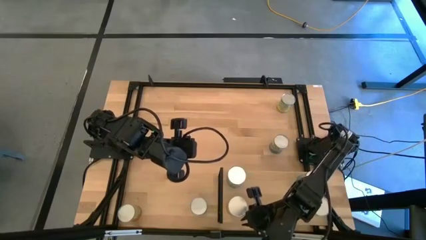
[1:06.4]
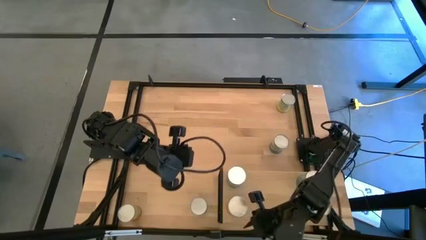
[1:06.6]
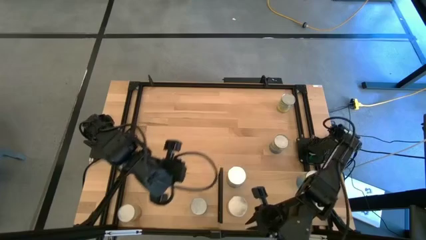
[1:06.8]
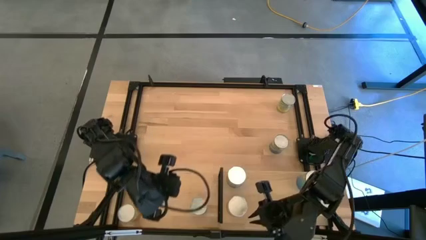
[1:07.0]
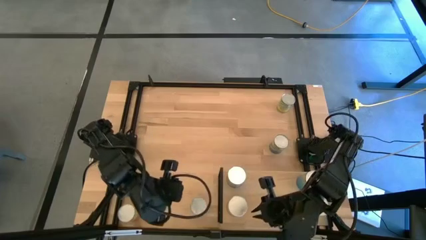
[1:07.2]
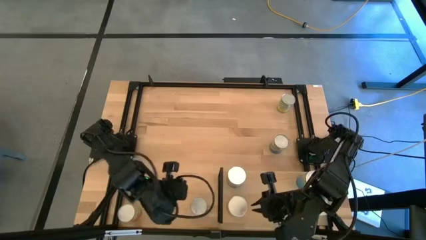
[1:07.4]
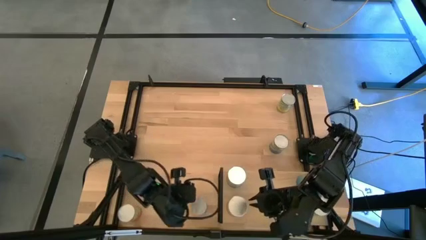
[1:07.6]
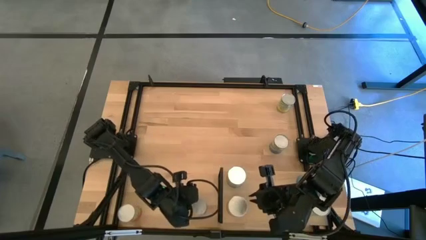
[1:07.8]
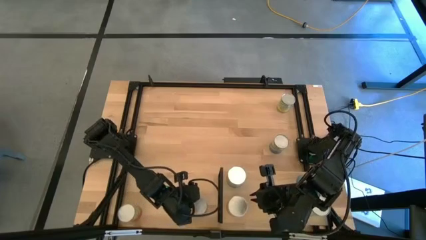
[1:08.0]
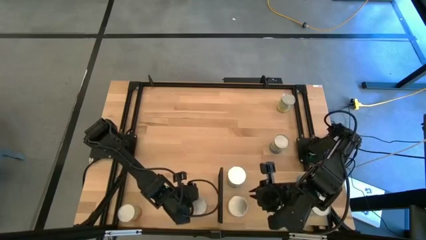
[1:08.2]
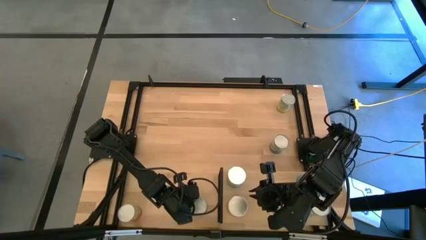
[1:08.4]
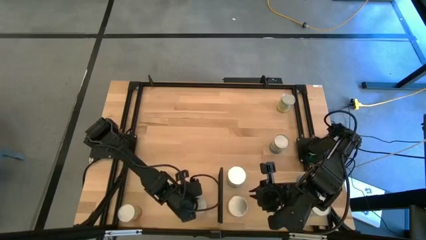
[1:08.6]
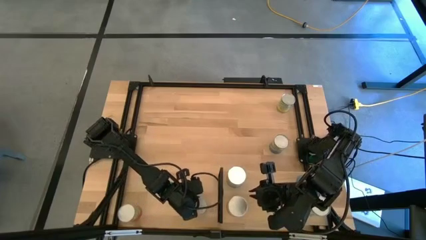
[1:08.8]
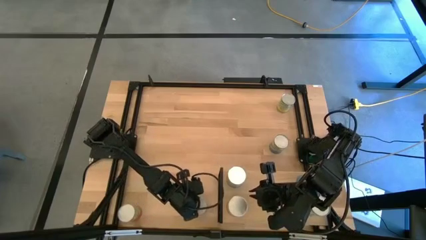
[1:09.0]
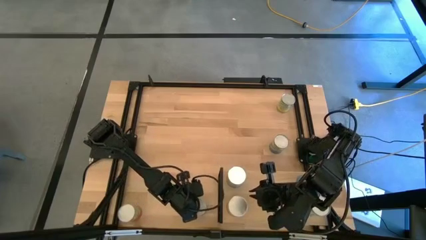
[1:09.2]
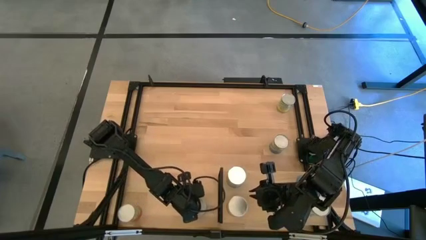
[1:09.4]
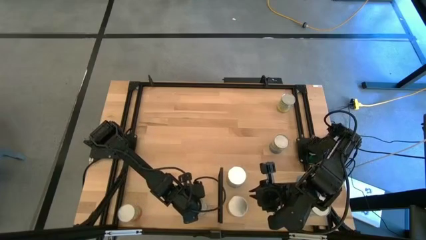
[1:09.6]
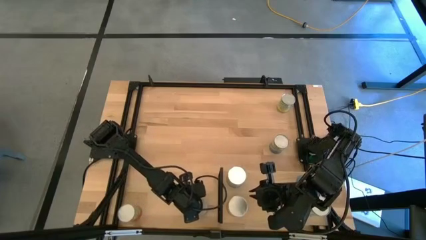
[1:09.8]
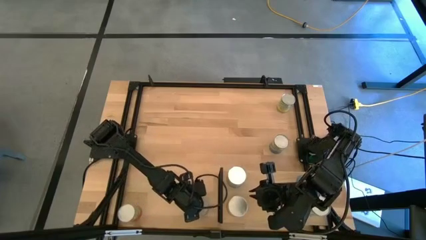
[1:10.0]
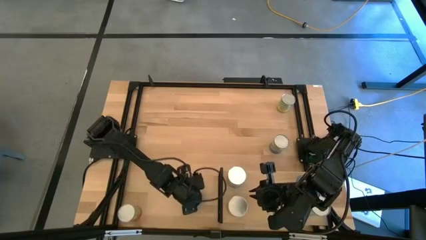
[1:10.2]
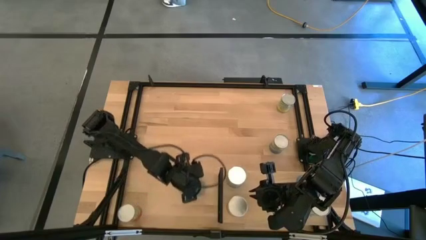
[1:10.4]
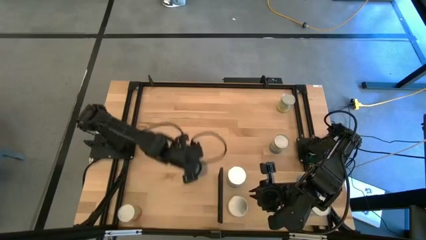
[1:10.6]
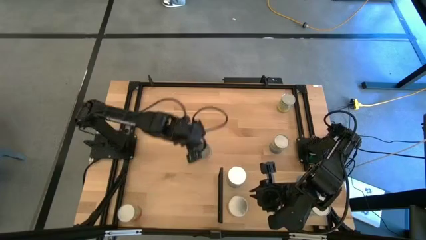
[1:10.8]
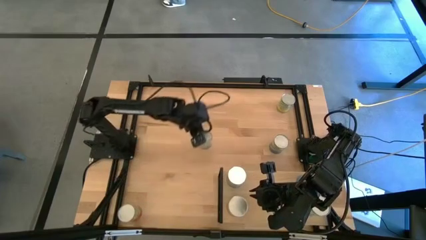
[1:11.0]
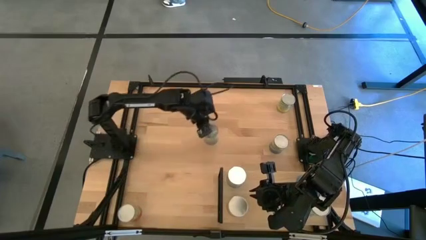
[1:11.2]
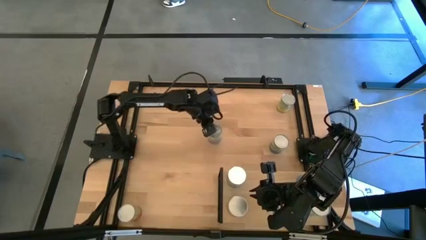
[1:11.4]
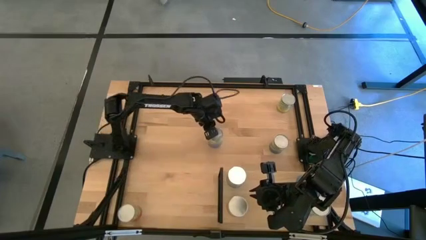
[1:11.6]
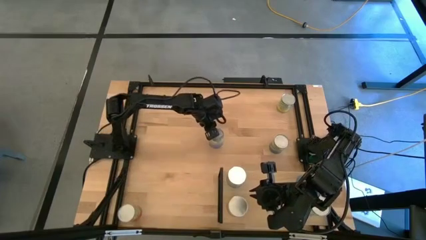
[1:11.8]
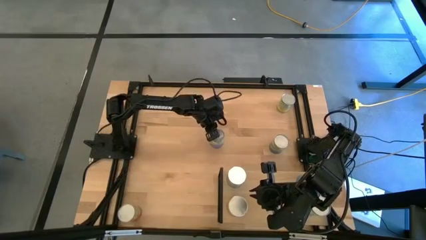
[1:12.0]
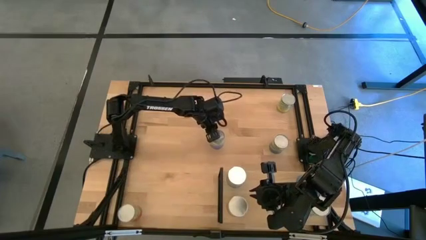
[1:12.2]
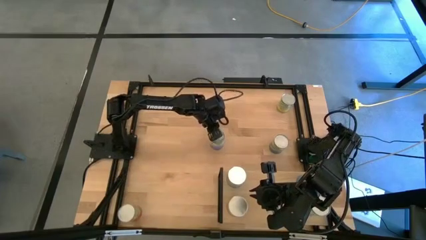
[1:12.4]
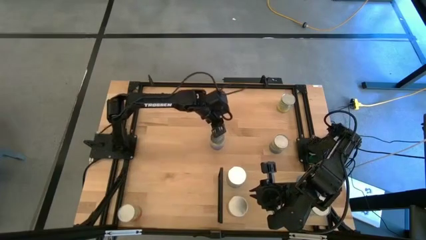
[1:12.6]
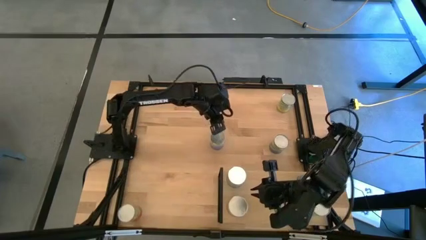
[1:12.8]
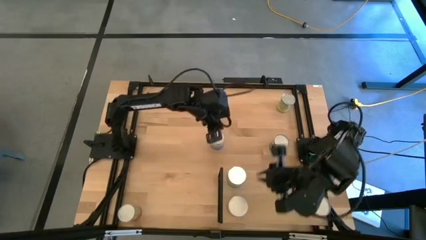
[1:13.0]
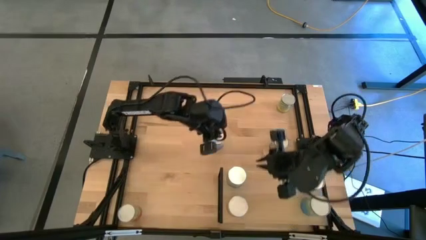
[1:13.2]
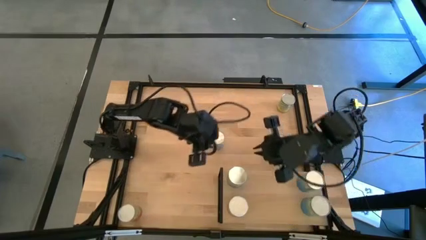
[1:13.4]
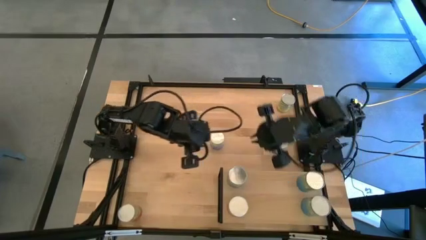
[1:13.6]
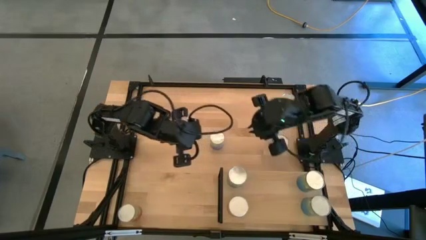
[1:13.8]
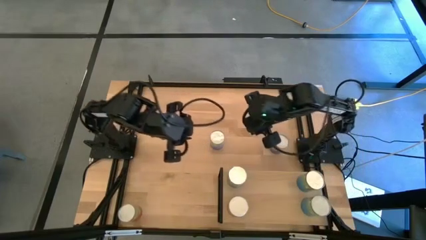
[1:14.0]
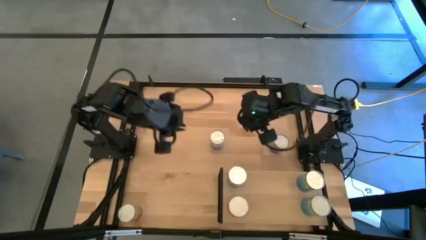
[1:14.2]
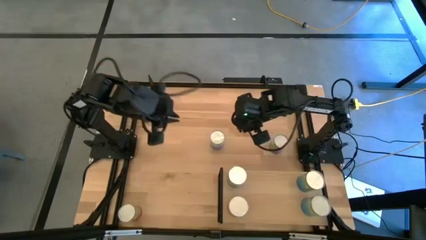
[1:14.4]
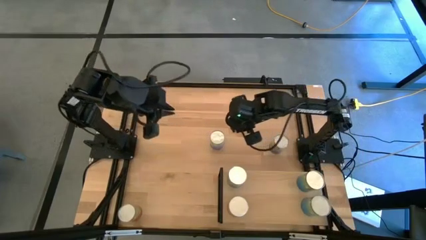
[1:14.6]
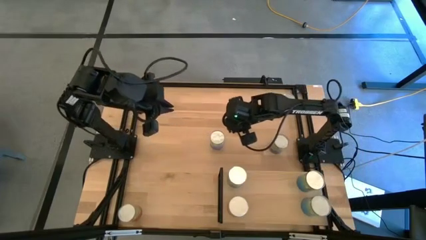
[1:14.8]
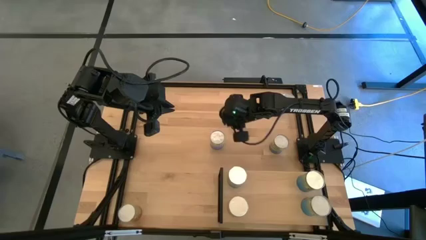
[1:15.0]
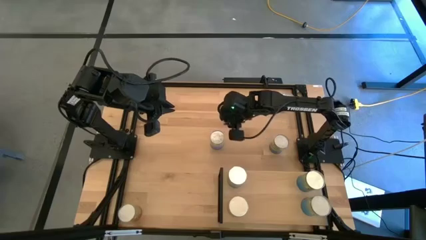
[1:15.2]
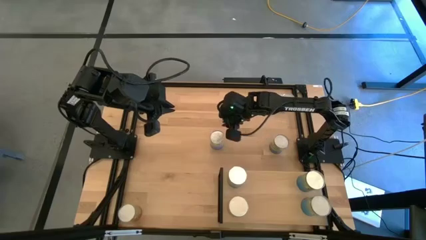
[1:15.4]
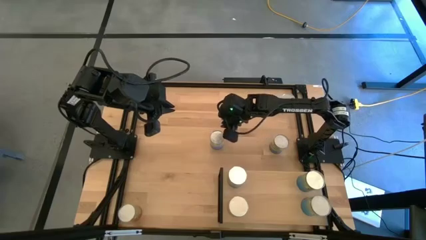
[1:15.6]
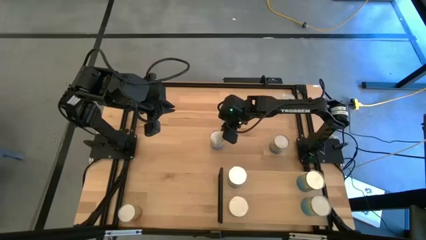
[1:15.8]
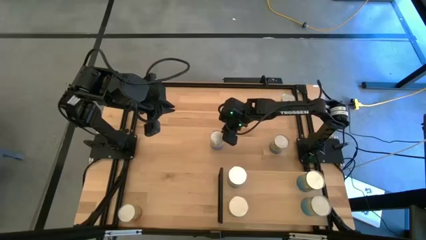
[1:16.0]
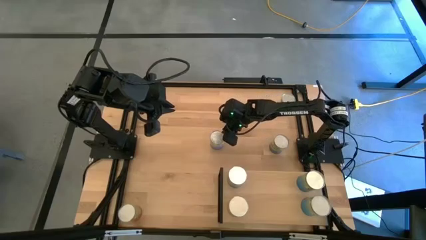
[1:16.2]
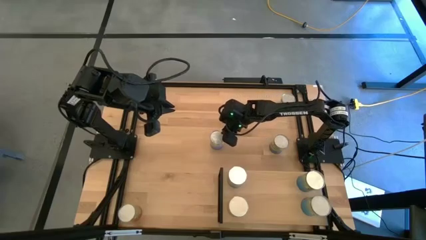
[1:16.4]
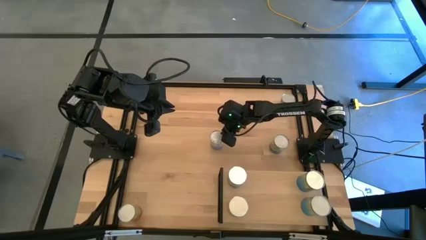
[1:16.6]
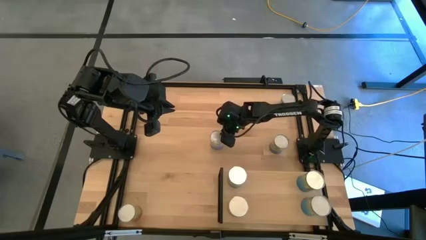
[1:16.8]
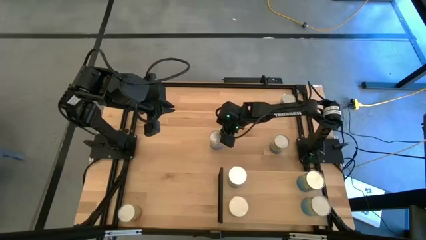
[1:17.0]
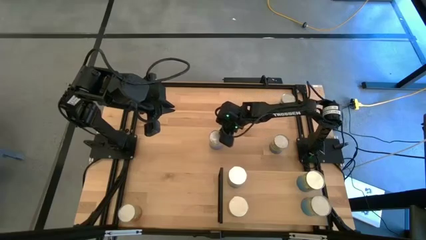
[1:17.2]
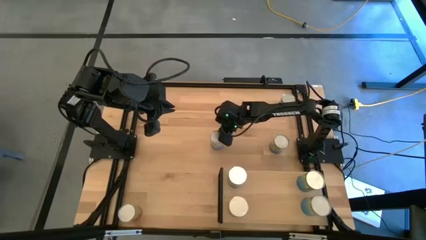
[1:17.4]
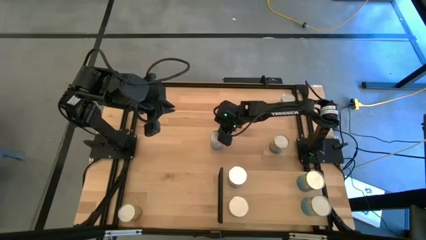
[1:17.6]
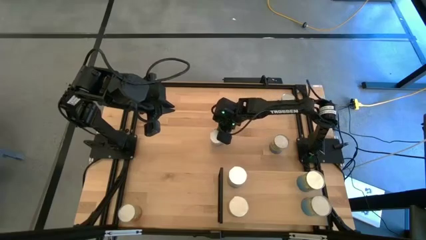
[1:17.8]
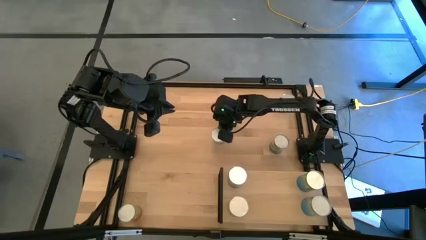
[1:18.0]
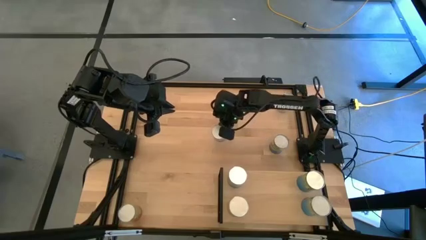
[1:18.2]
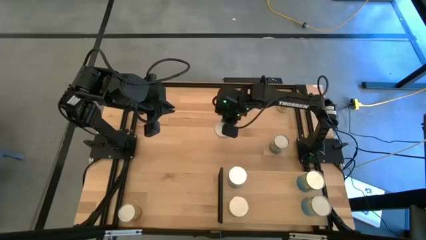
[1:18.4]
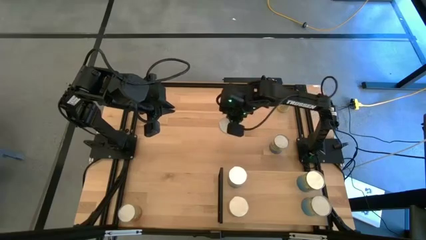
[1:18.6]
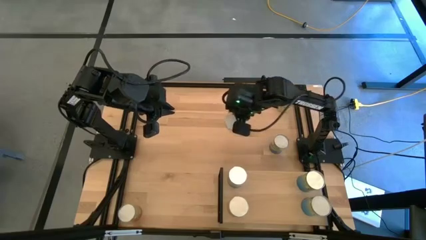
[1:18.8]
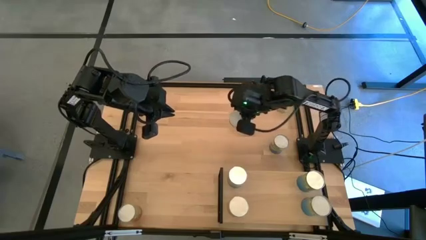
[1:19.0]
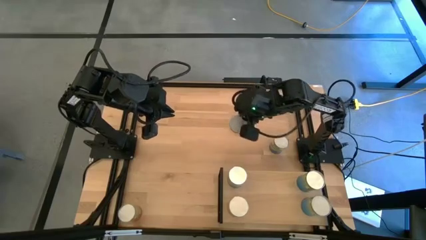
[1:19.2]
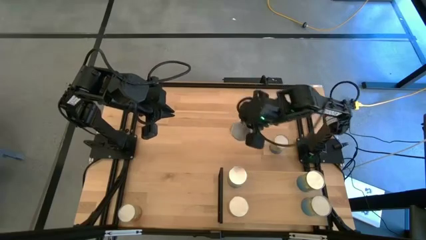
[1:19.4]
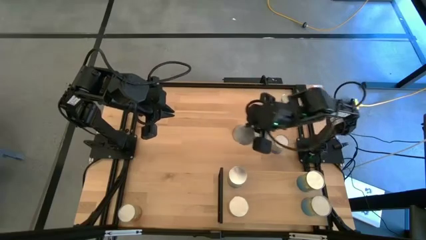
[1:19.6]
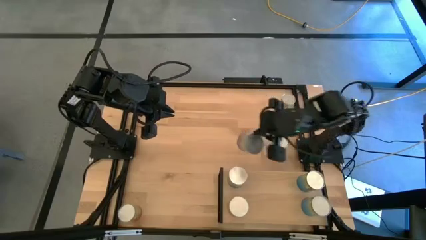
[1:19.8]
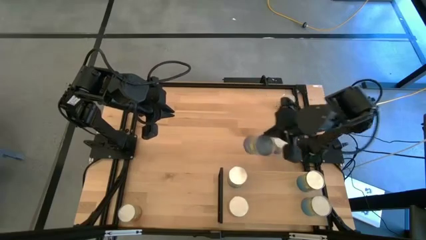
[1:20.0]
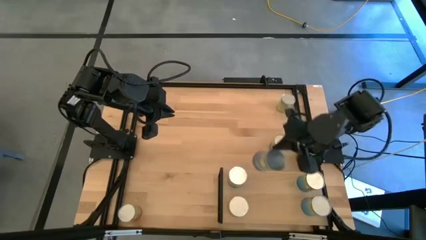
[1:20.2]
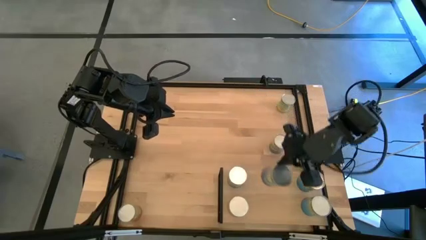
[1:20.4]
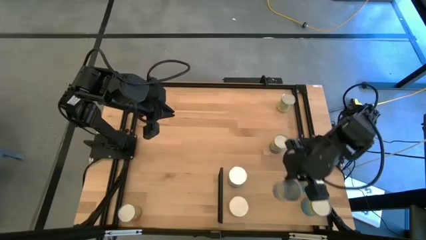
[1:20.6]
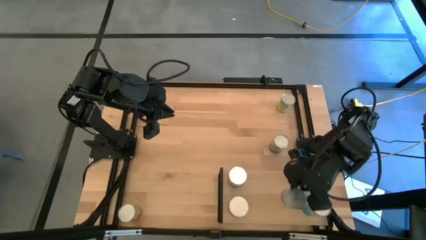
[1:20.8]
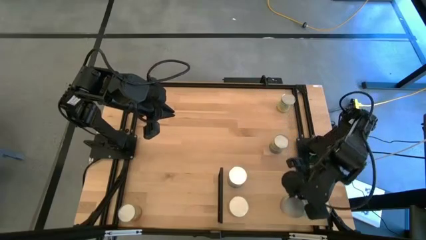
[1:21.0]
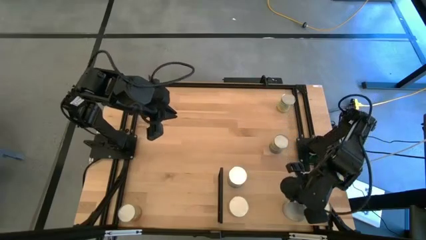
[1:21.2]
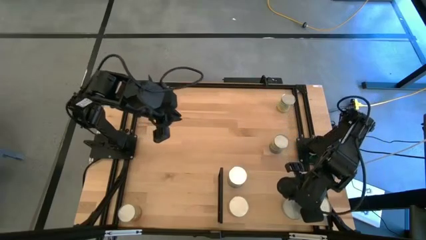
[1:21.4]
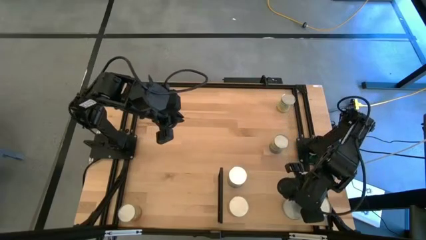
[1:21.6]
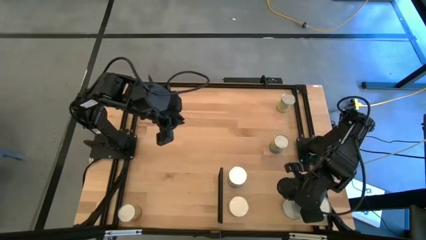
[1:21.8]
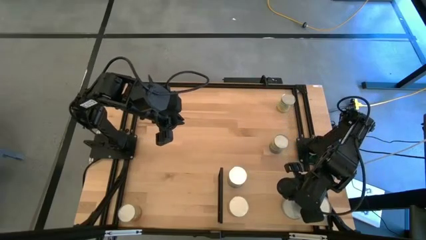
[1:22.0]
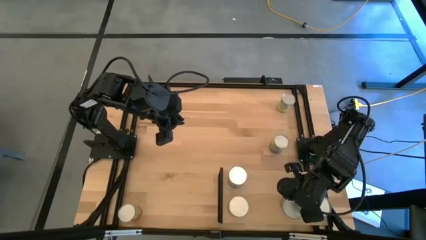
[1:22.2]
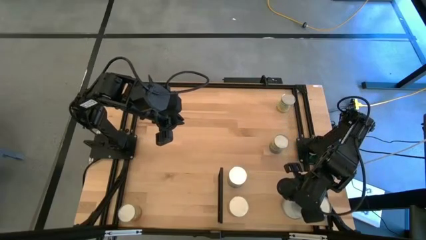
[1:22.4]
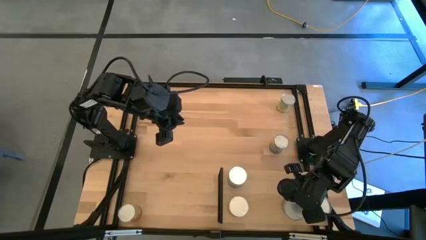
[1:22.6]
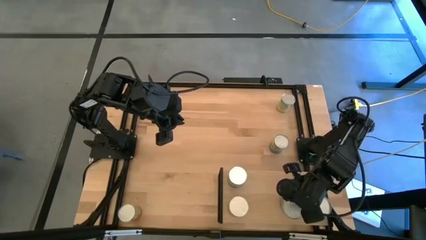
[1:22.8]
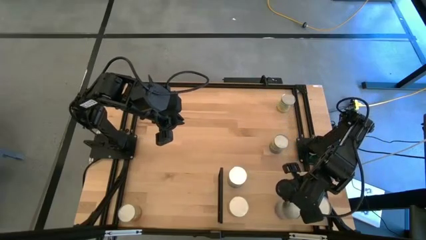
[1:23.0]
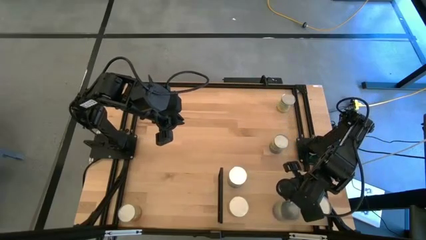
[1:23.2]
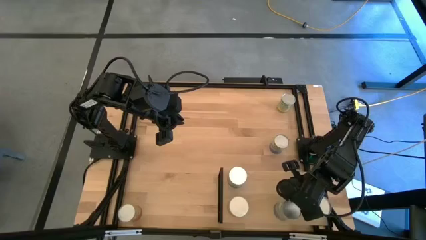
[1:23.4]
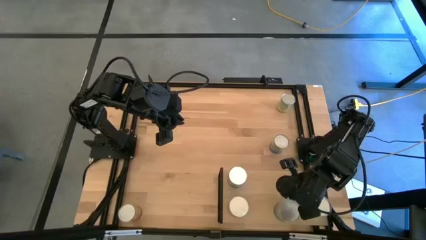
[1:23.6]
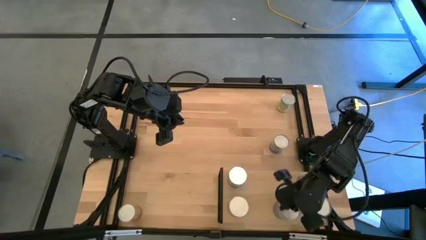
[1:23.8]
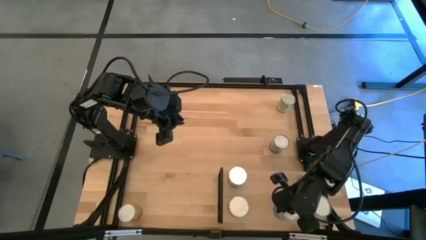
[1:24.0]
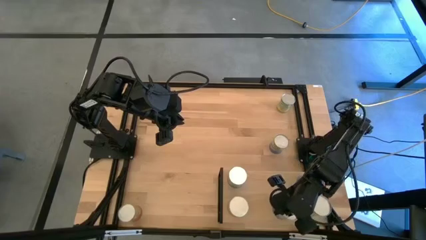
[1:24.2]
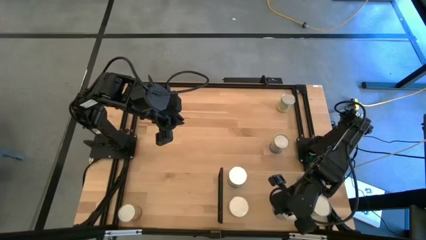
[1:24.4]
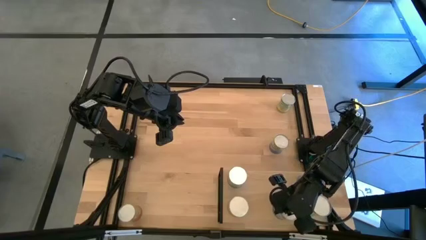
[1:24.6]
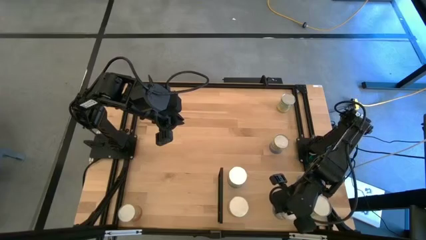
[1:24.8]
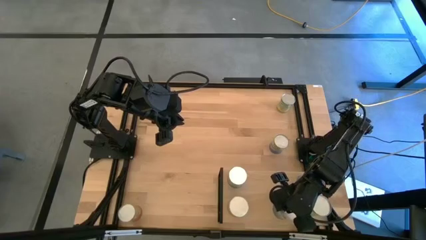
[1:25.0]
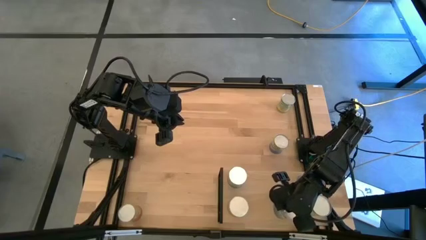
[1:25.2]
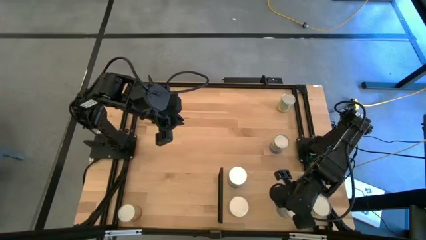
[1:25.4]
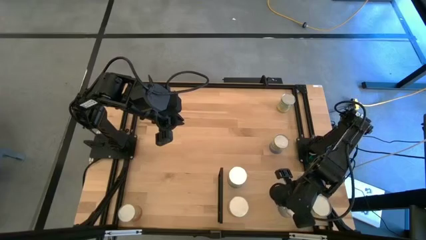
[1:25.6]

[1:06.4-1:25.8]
Task: Pick and place cans onto a shelf
Put the bottom canned peas on the shelf
